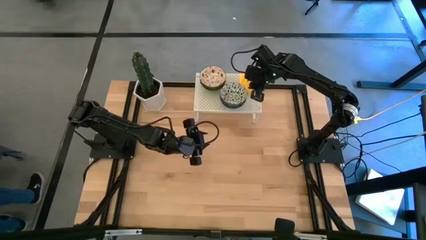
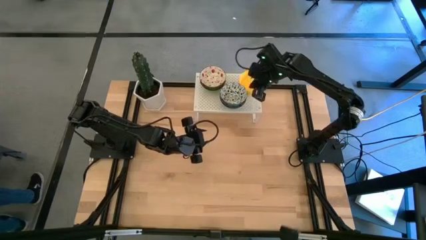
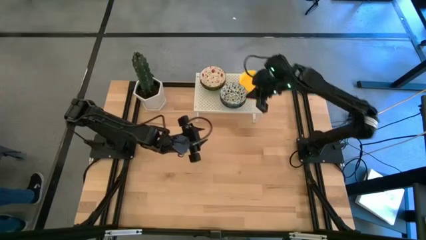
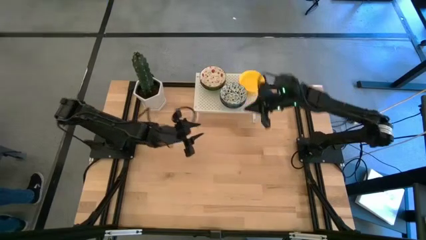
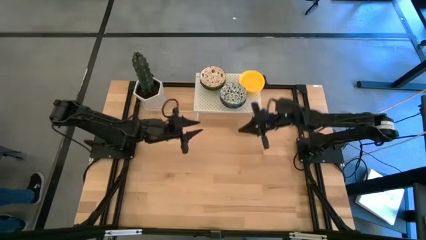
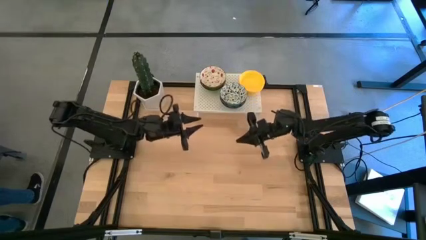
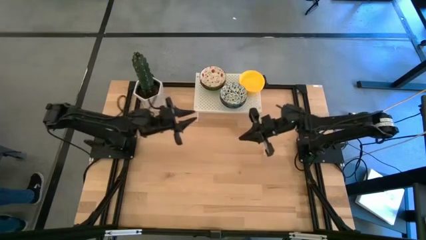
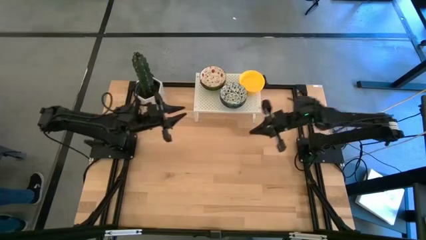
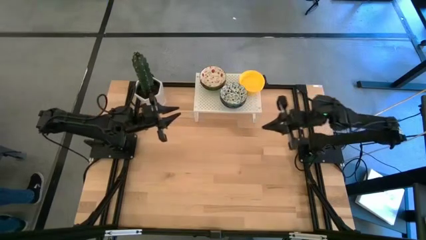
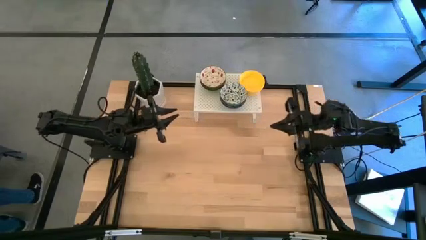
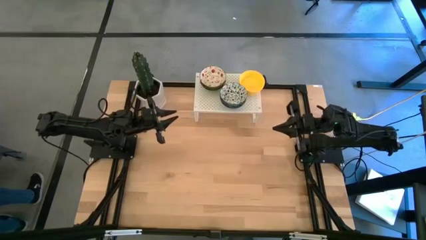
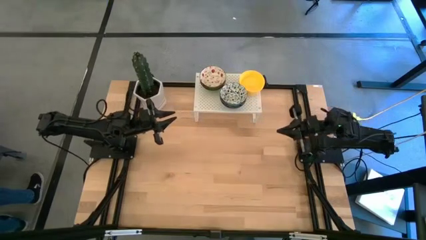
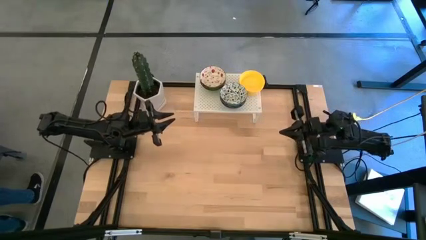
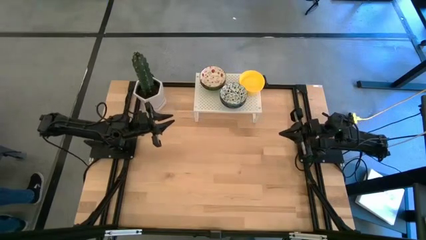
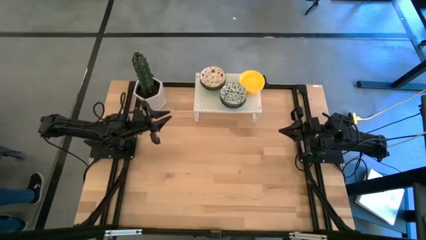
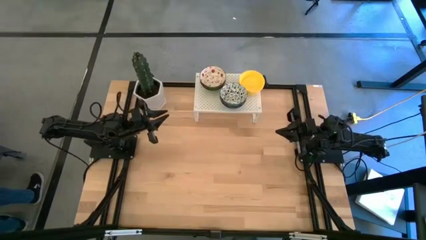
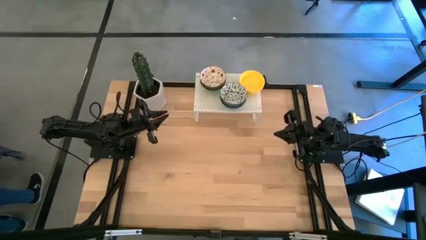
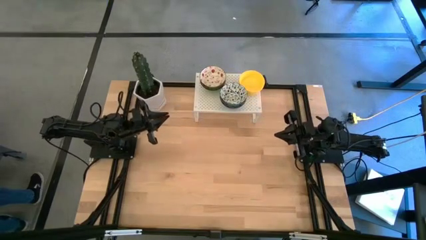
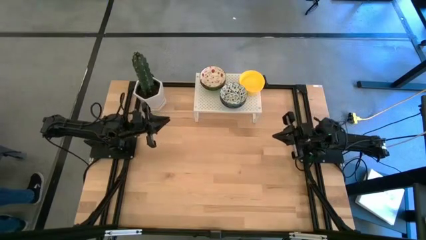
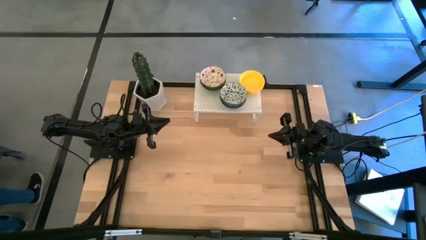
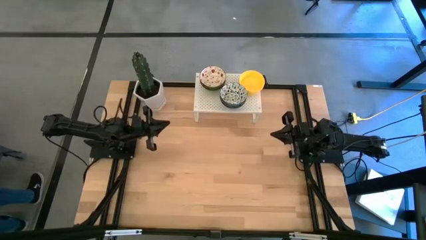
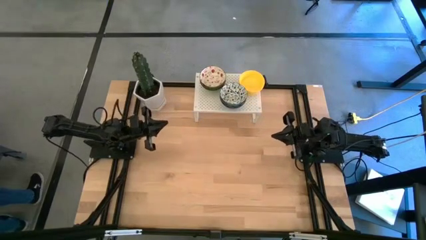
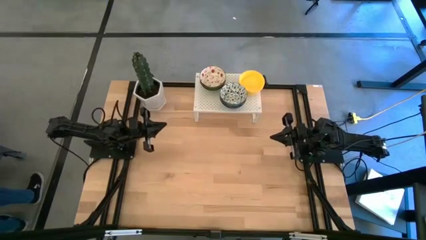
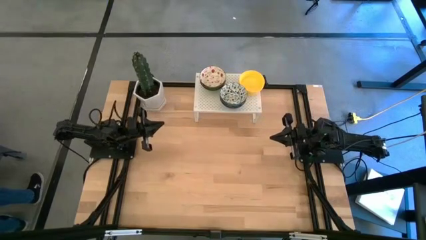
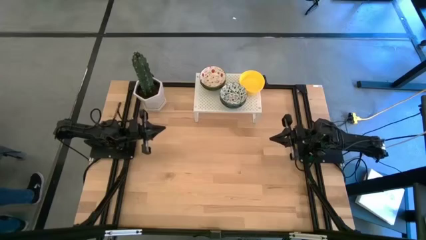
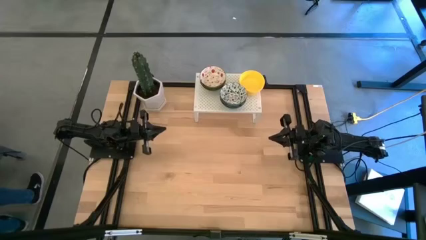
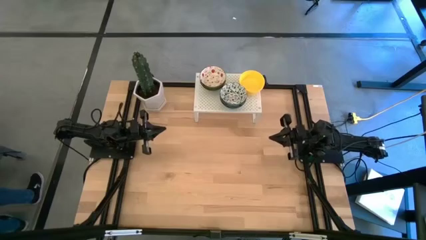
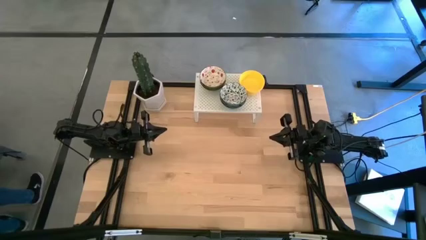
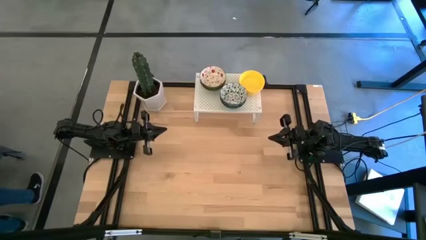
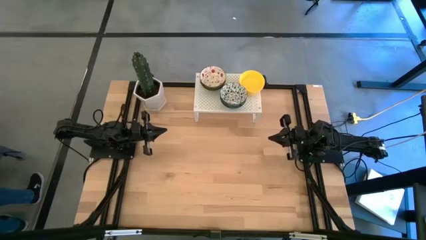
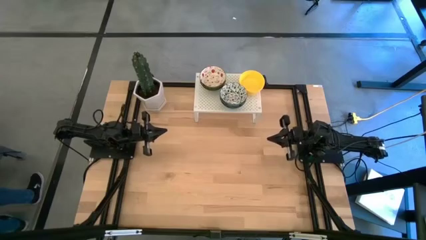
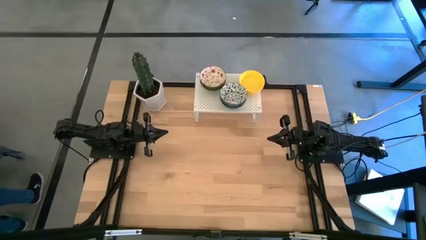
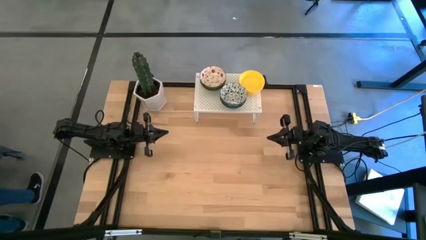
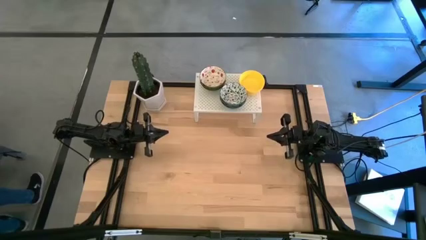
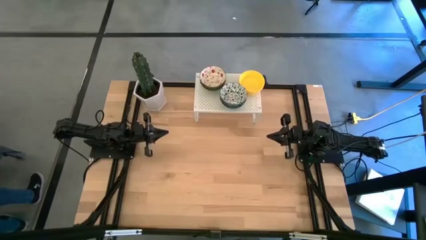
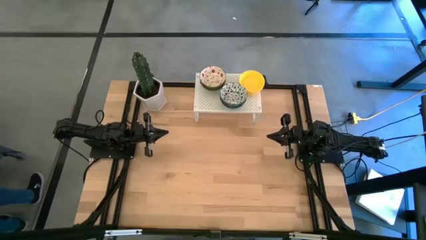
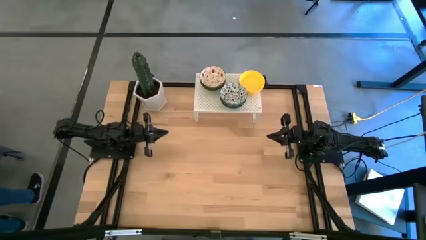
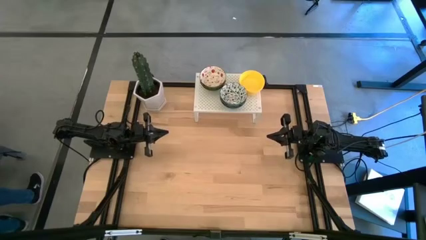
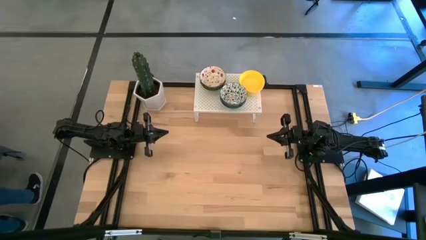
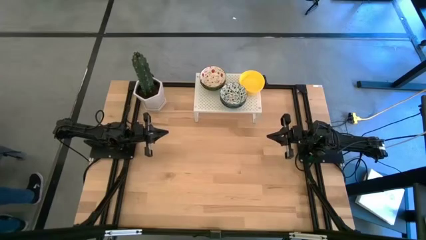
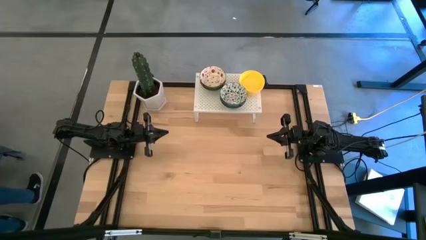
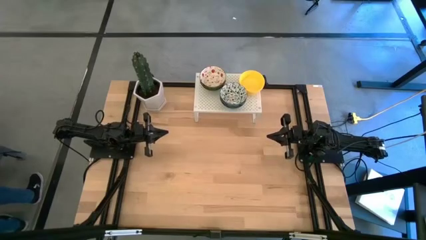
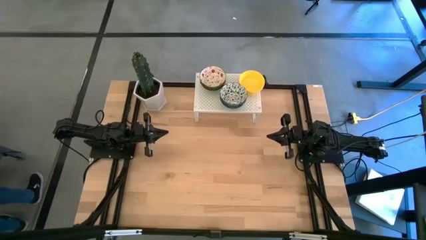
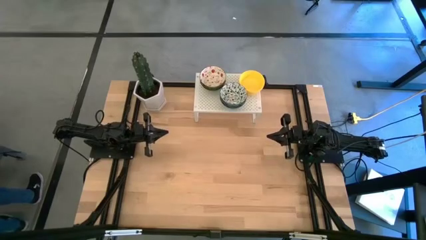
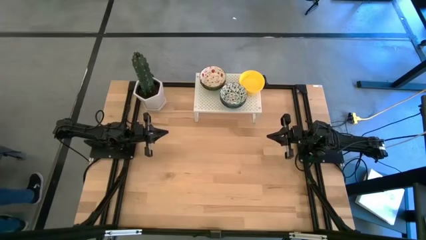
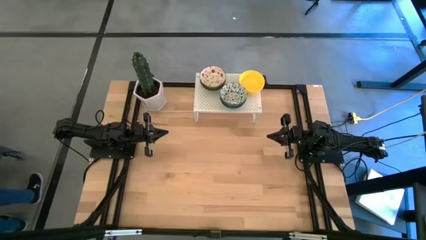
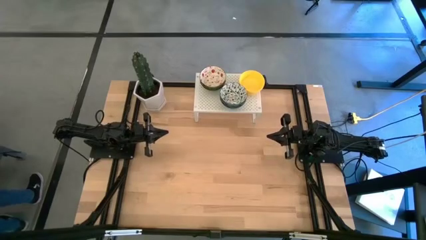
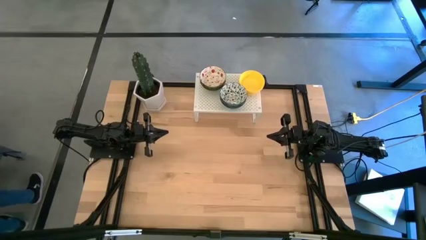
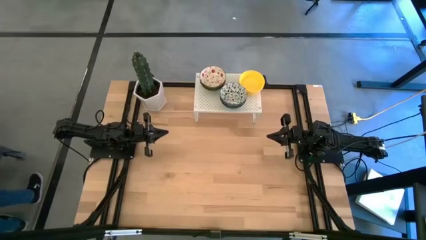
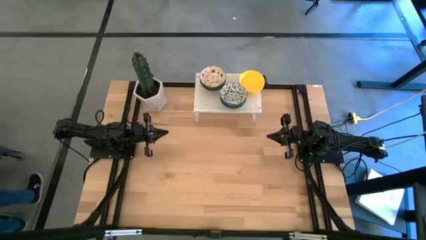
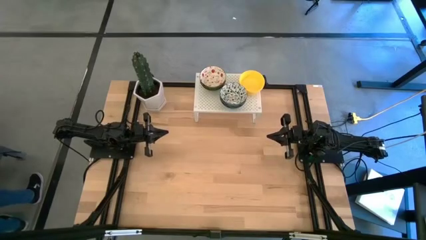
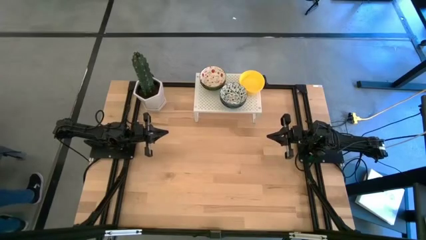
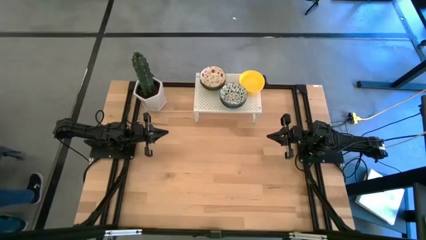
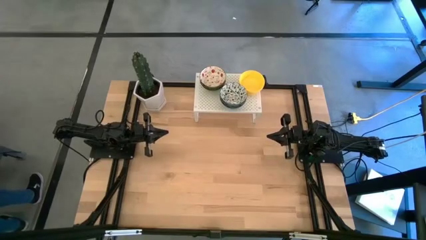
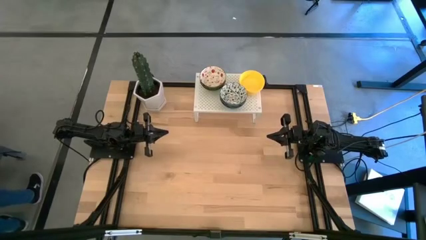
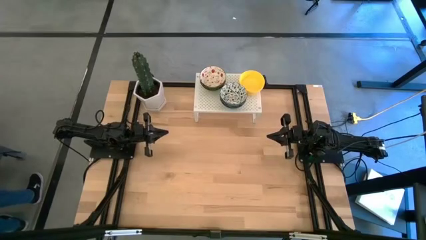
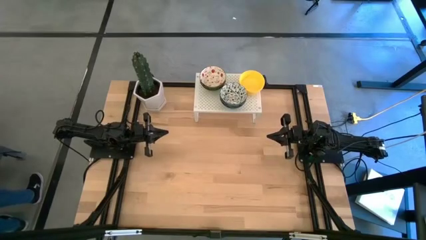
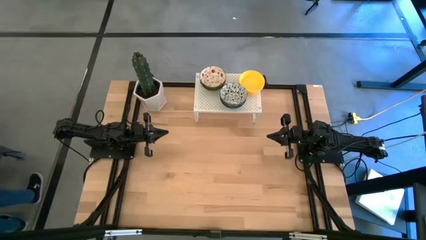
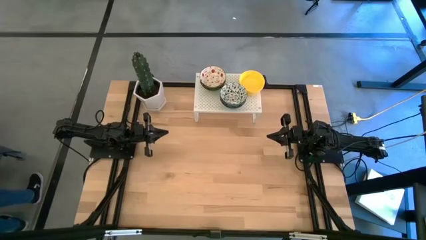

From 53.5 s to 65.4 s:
Task: Pick & Place Mini bowls
Return to Home Position

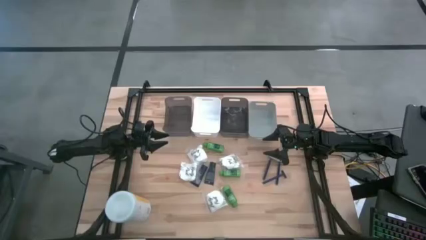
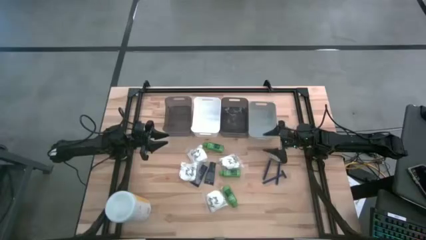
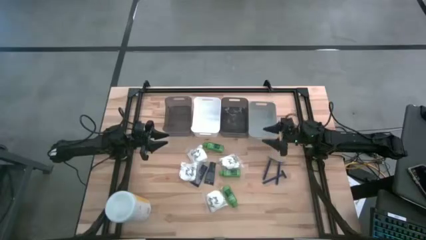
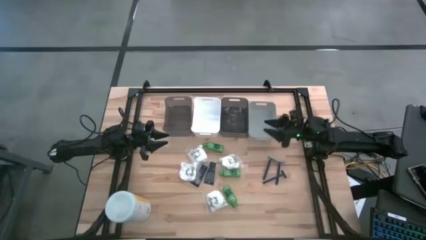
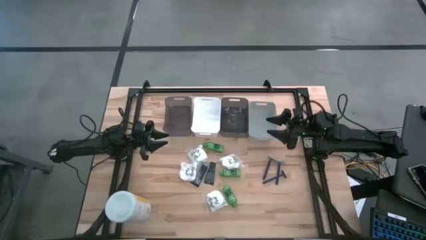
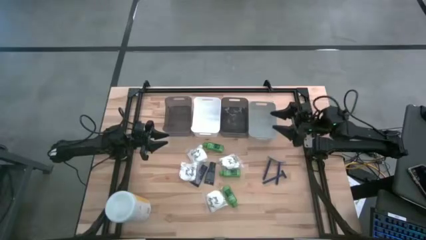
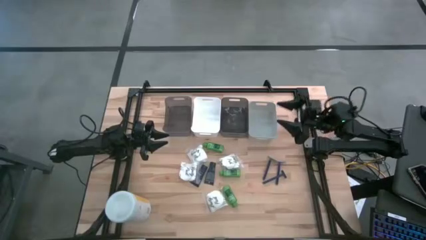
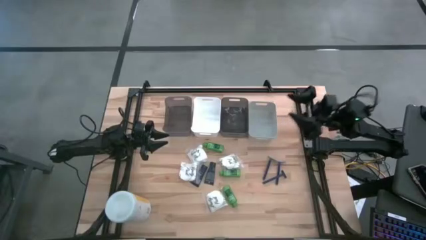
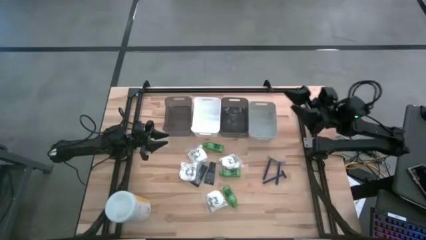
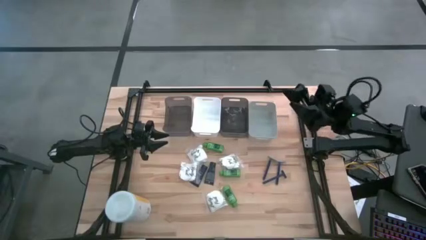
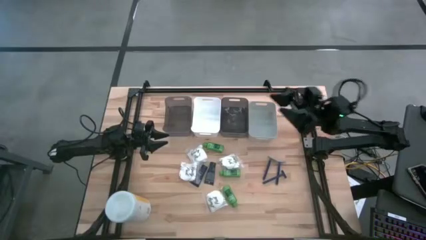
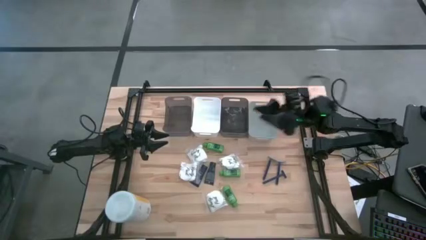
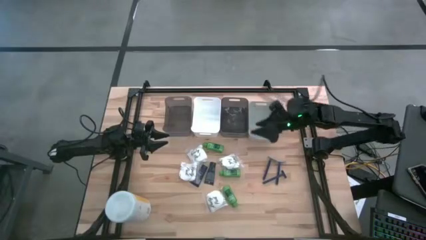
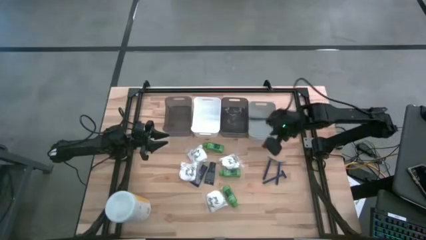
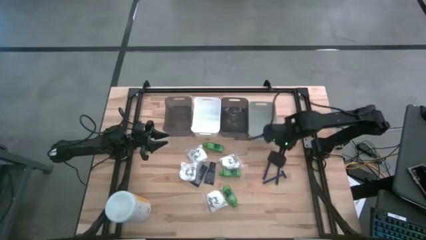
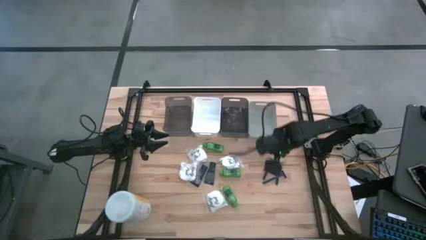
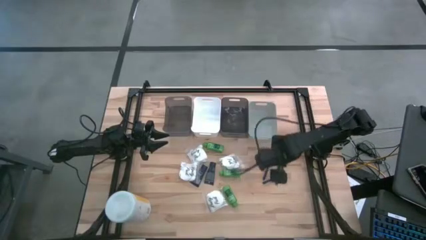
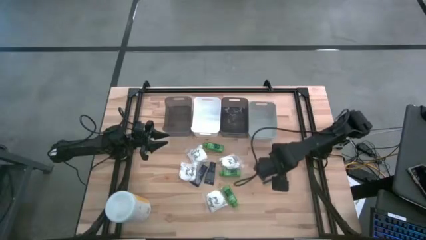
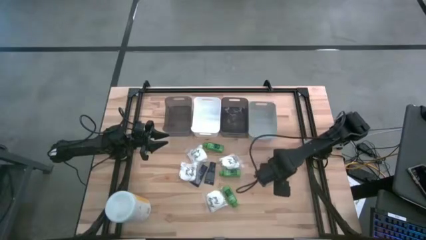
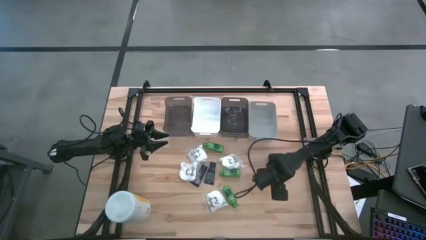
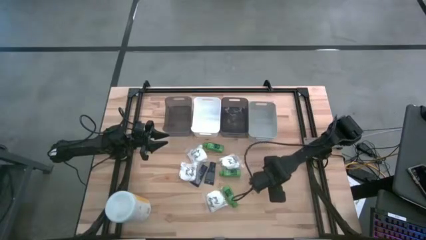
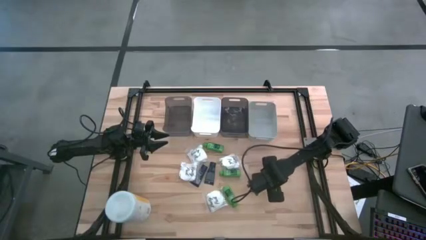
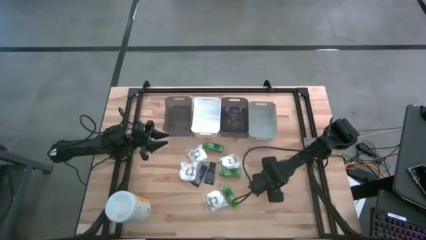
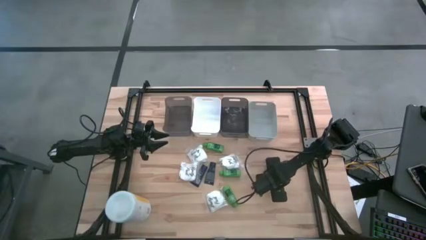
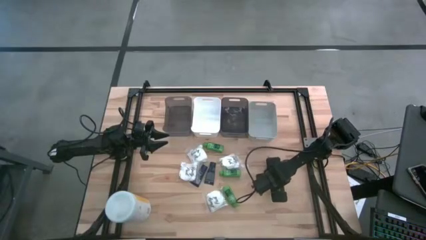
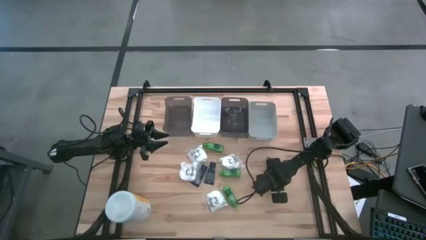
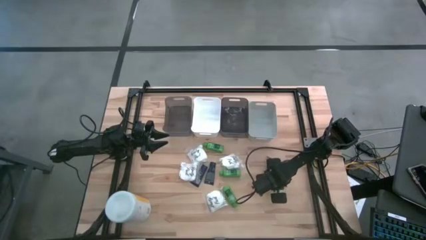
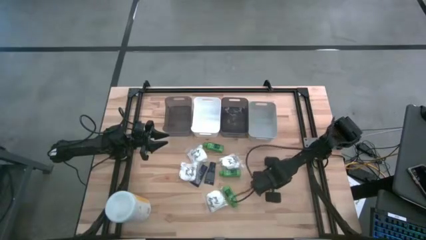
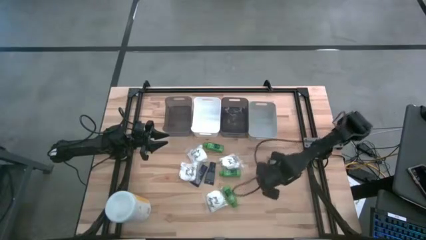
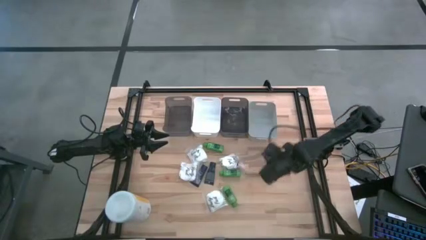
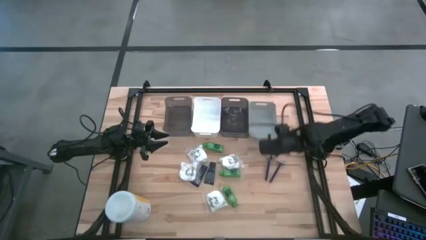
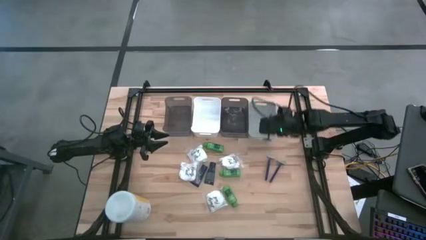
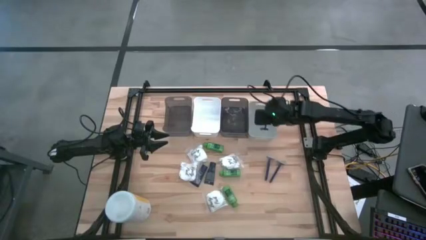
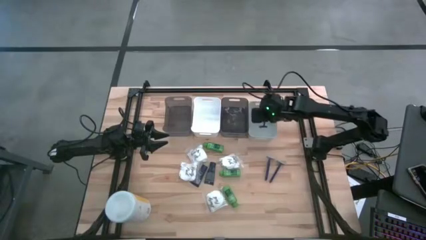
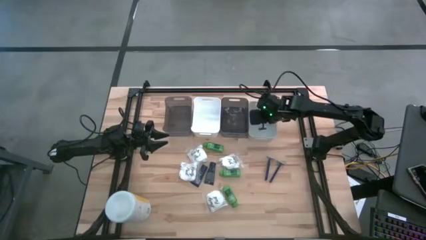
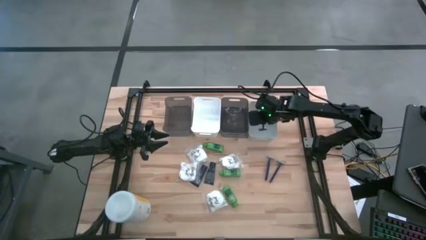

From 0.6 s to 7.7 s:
Task: Pick & Place Travel size toiletries
Put the right razor into the gray bin
